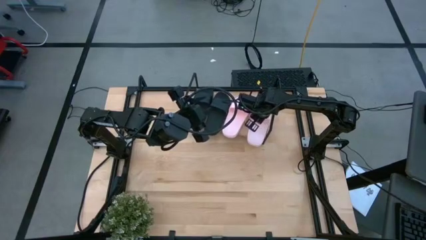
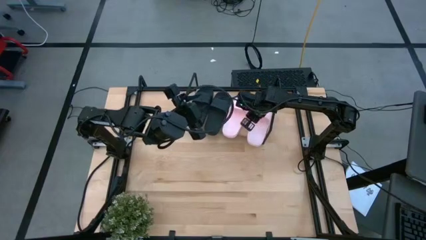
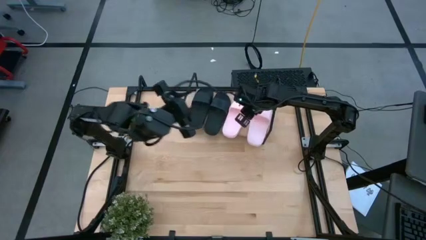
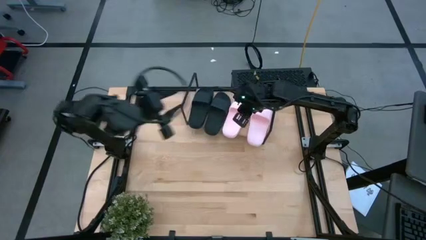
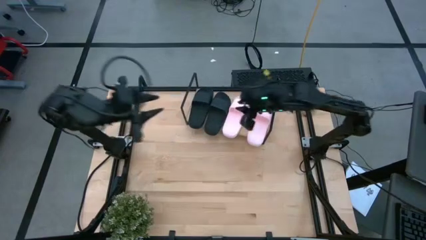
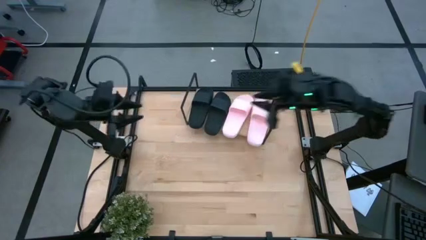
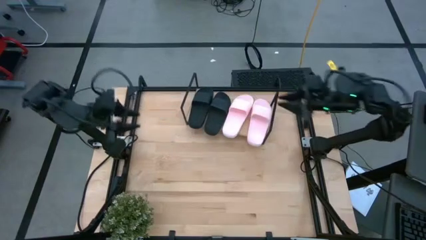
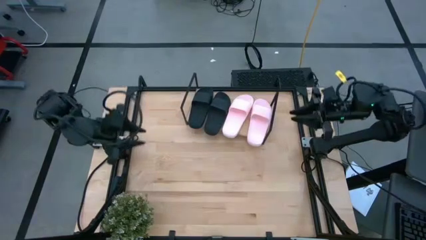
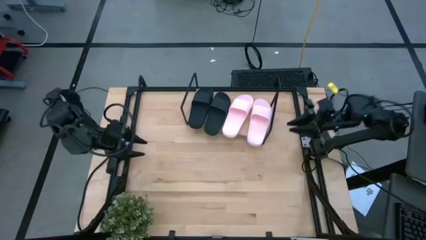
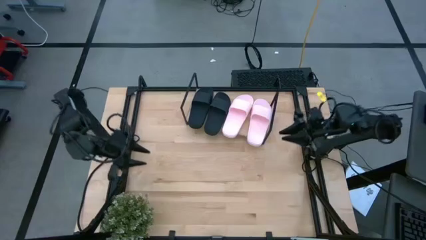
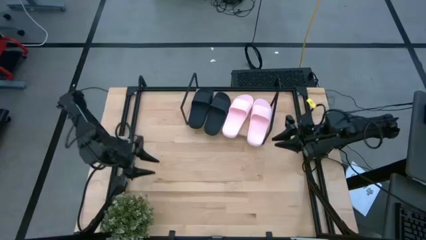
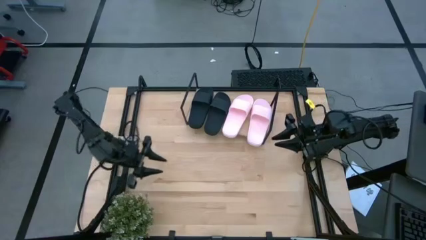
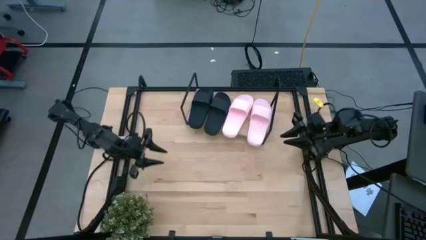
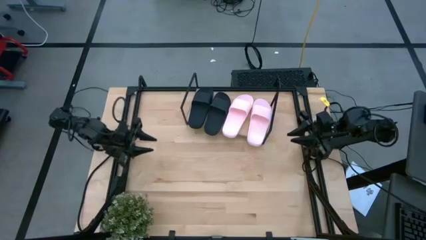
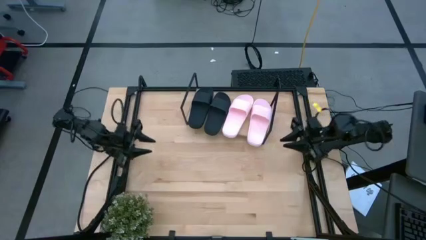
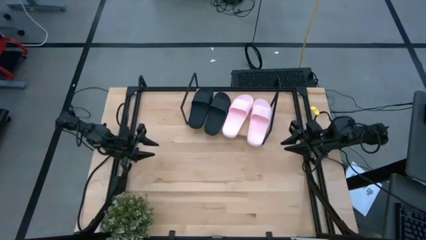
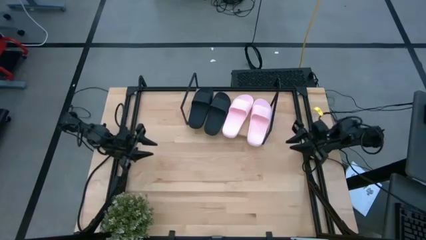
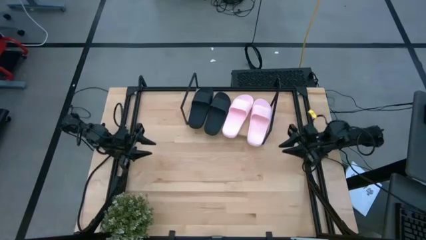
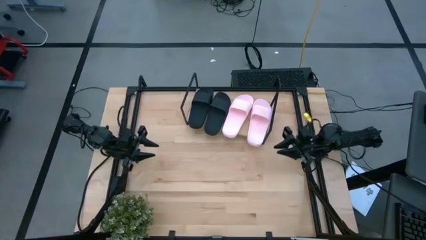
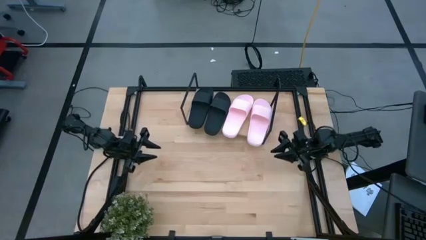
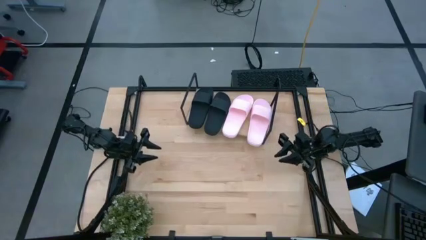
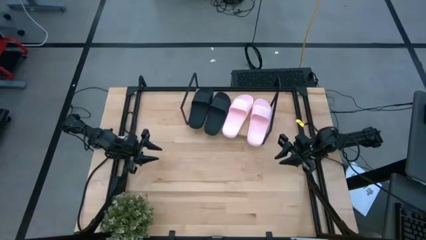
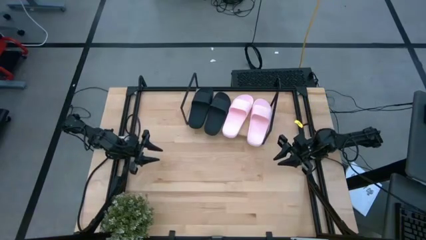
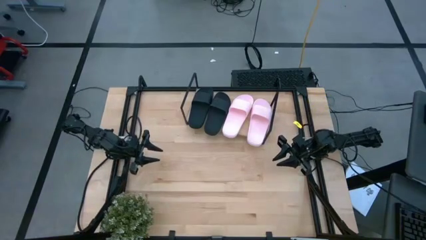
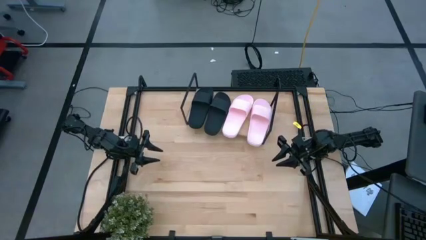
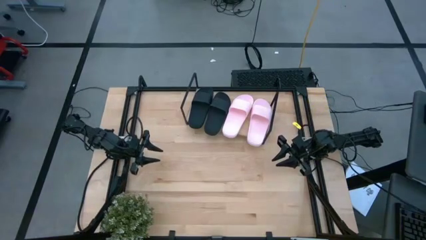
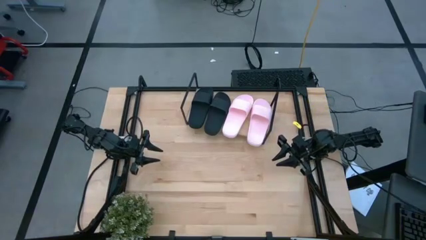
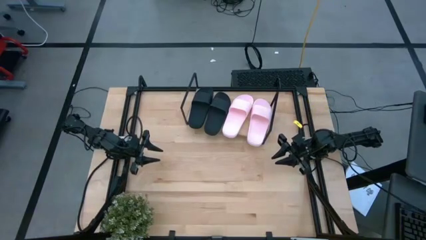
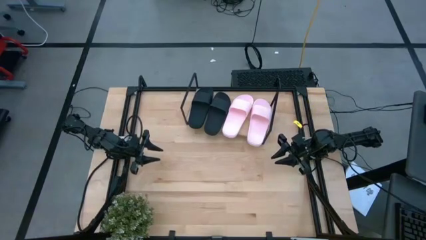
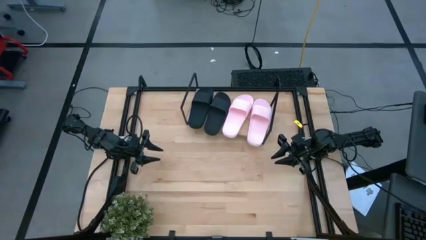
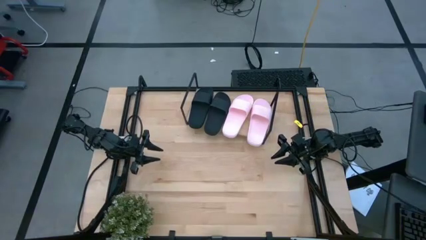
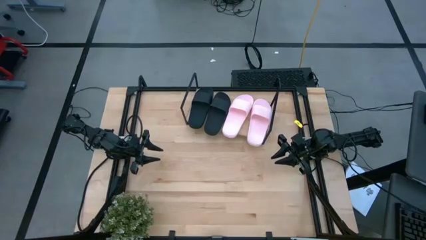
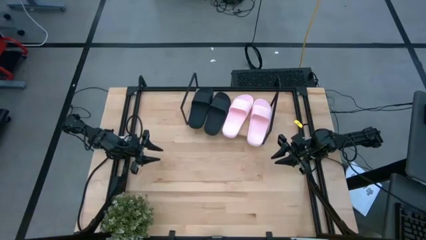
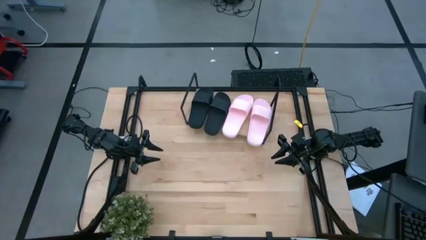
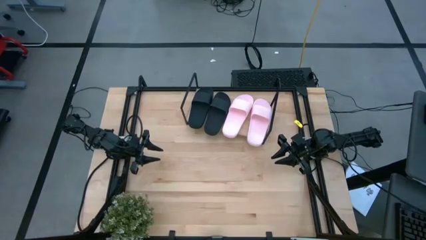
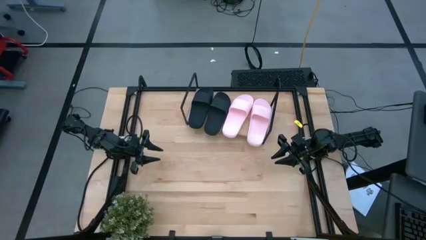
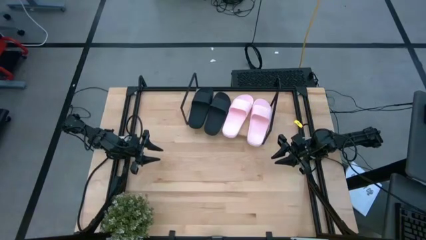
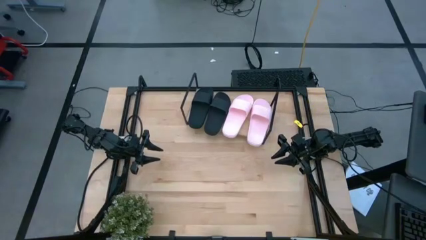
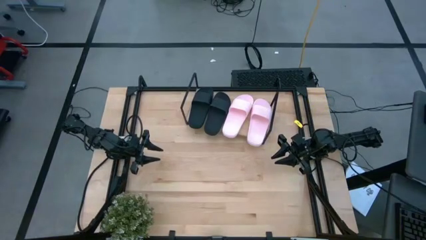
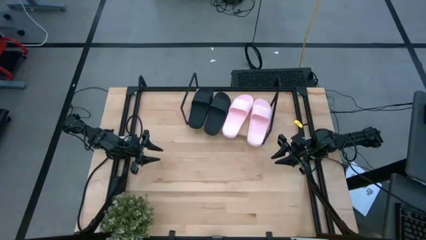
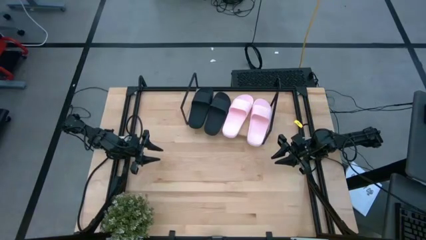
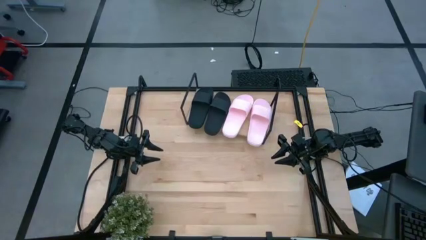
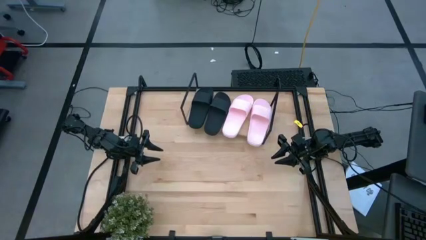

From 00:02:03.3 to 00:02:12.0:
Task: Pick and place slides into the shelf
Return to Home Position

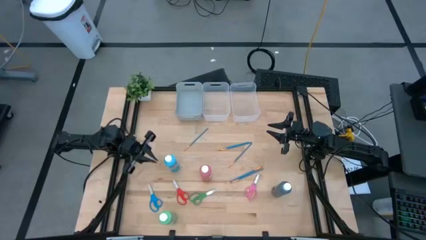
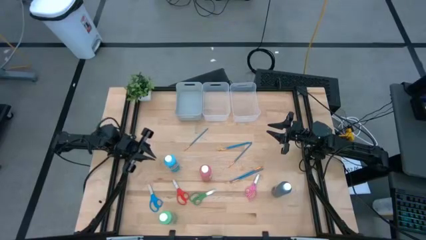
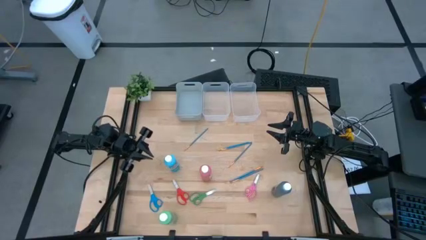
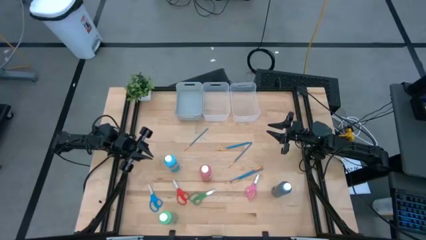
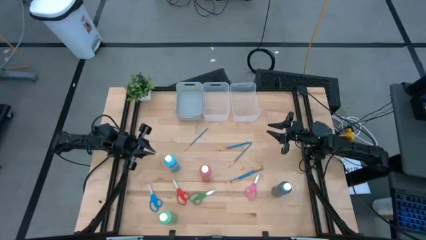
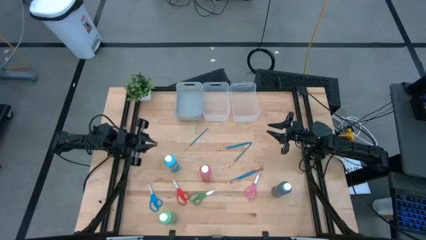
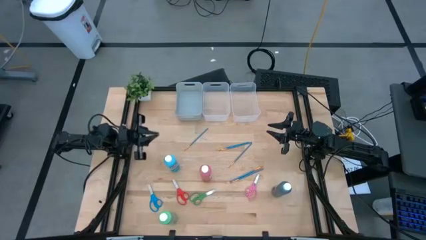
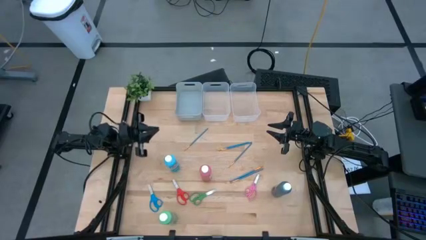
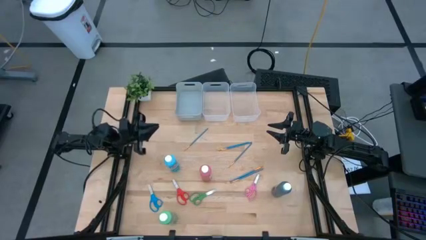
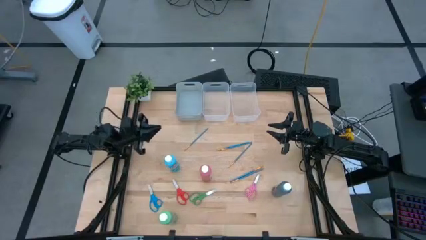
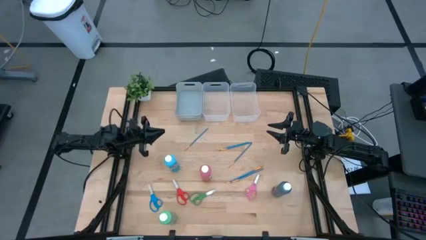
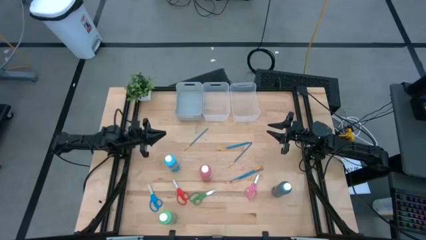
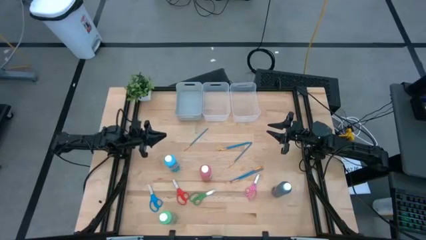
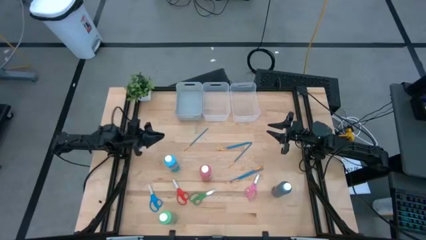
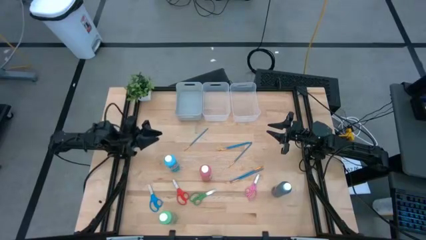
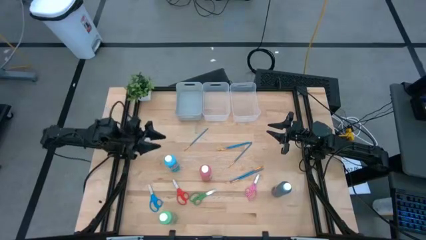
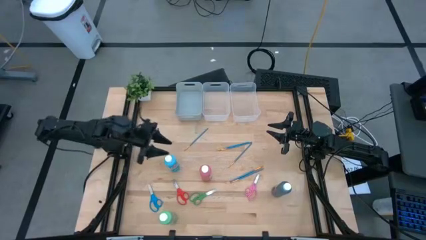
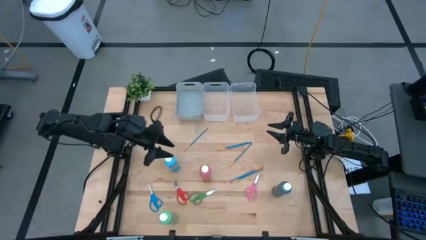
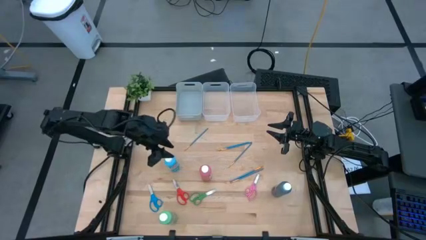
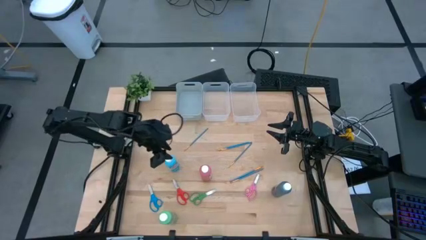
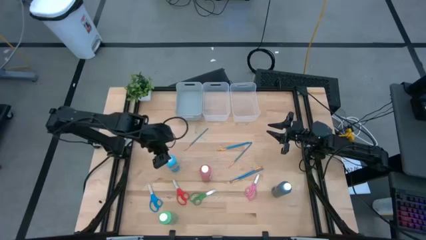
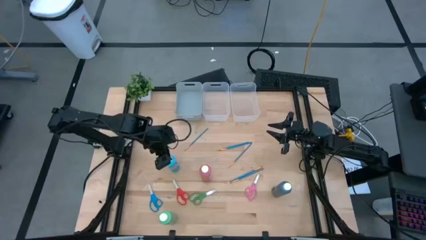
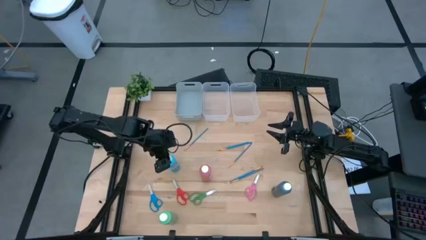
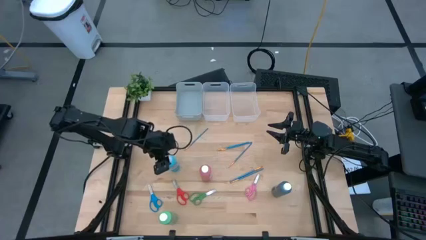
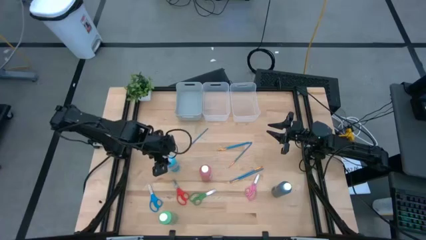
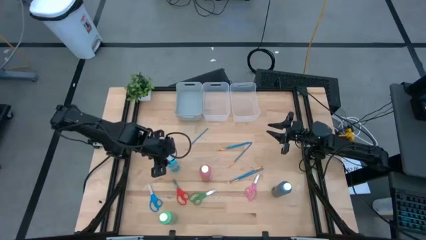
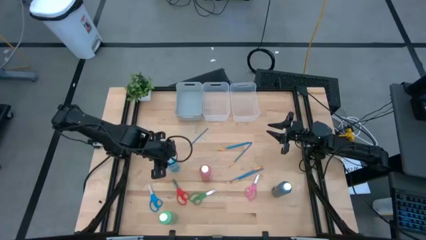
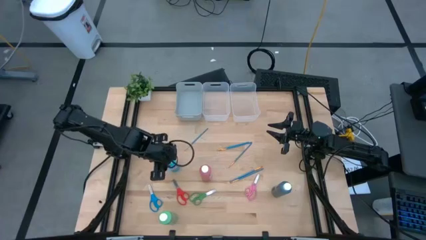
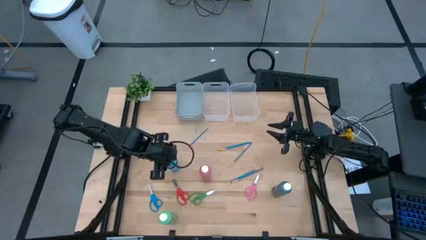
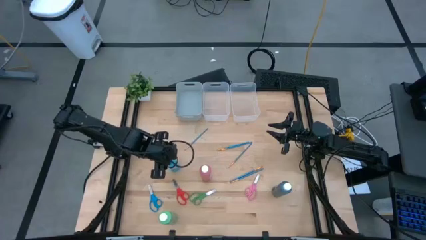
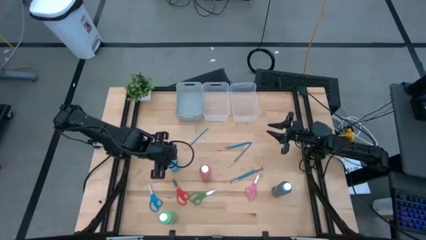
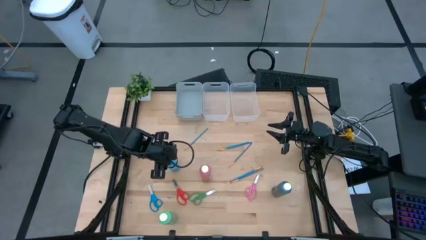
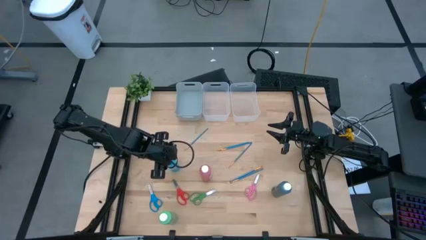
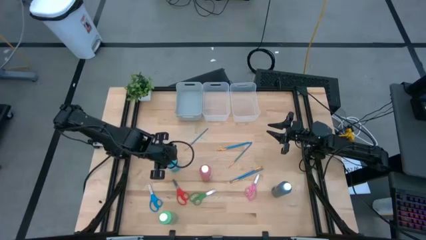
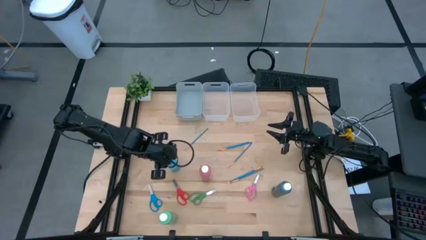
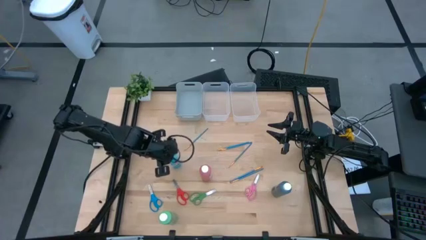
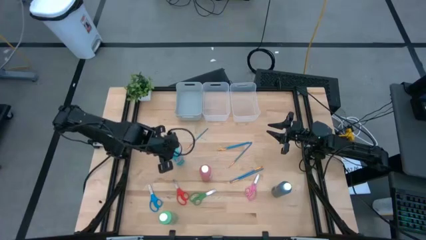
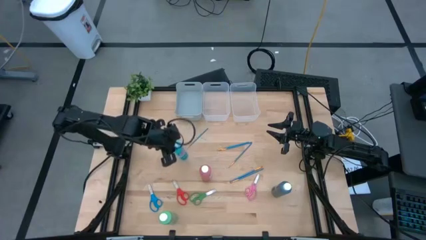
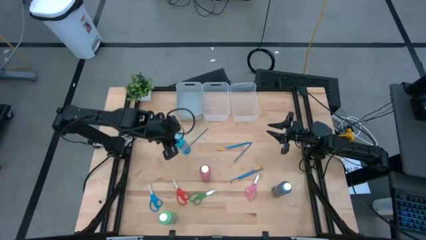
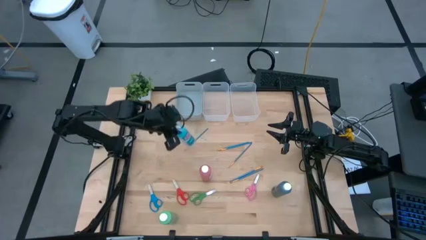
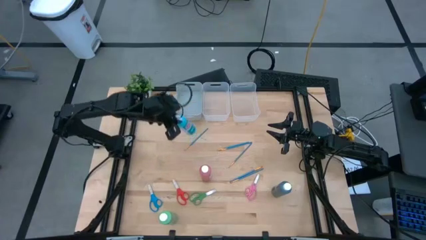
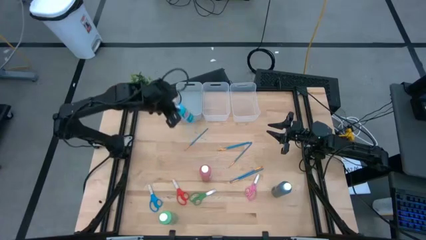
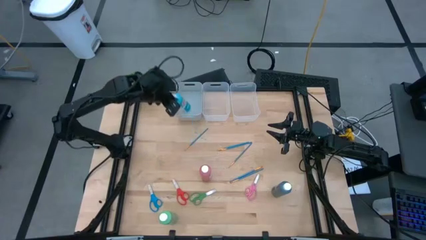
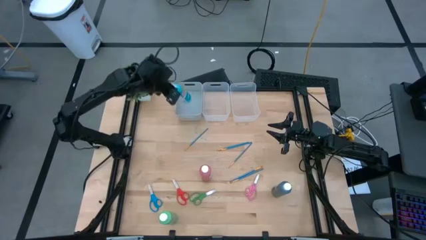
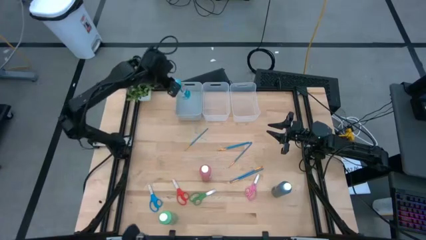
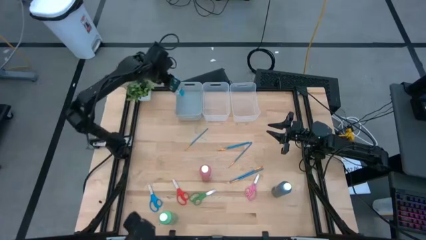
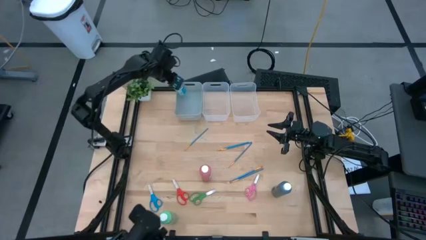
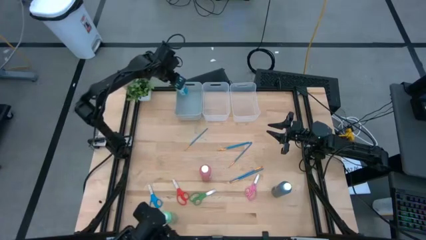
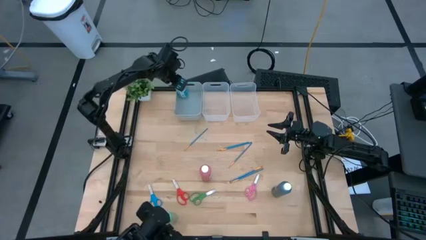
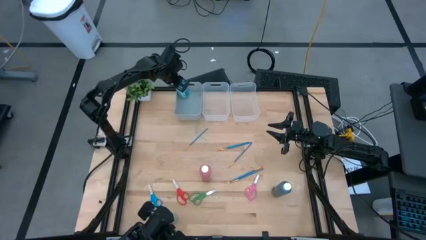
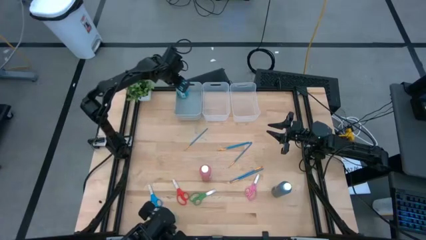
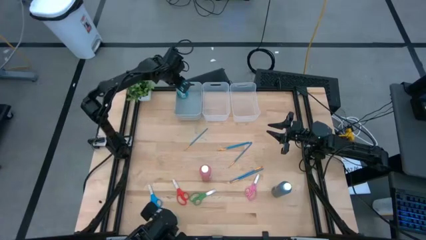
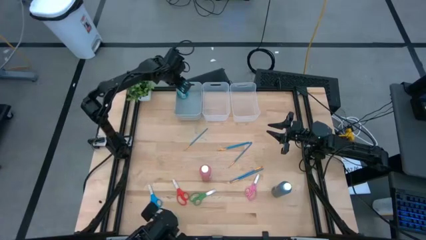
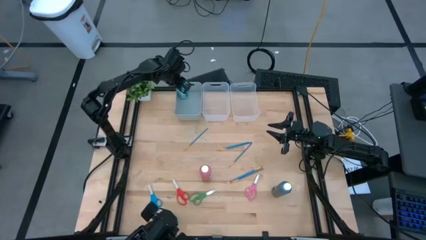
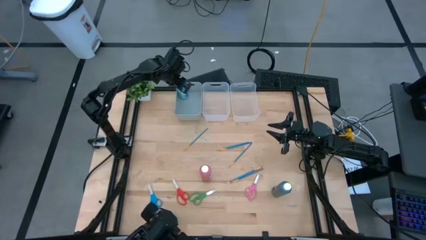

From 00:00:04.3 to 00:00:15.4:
Task: Pick & Place Paint Supplies
Put the blue paint bottles into the gray bin
